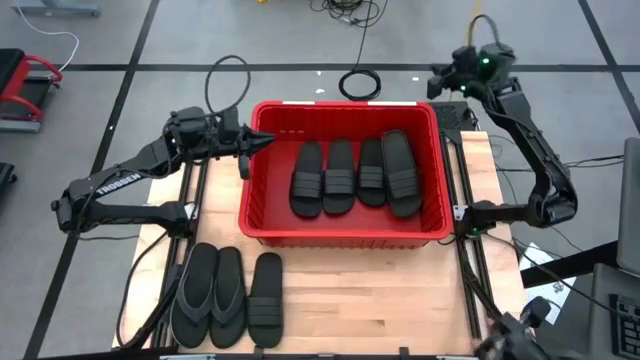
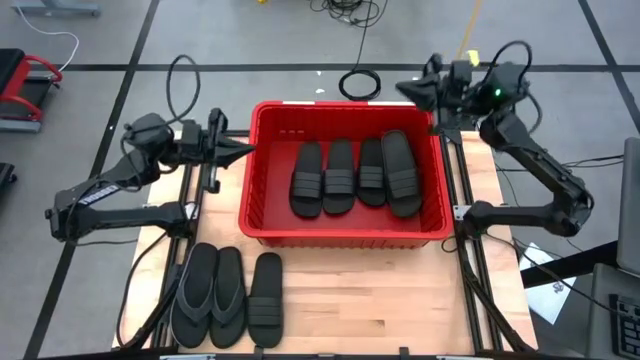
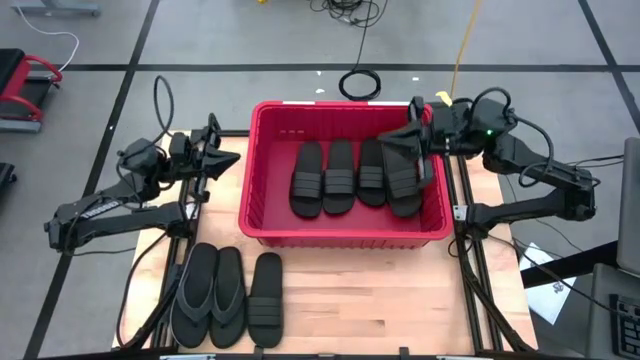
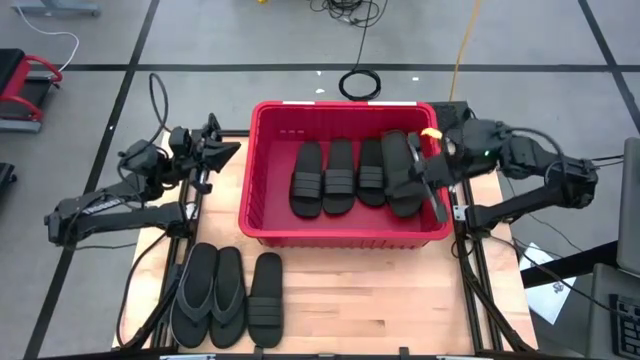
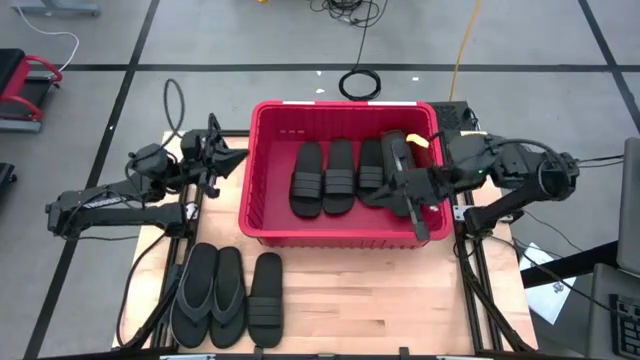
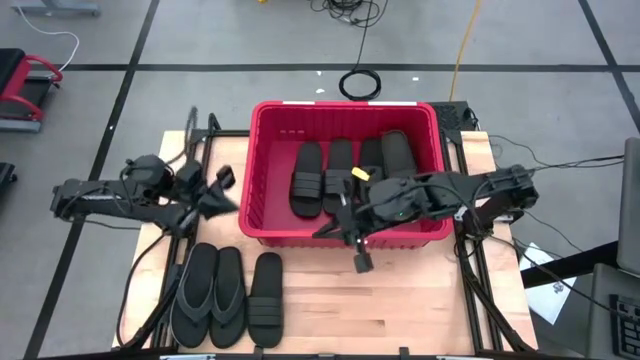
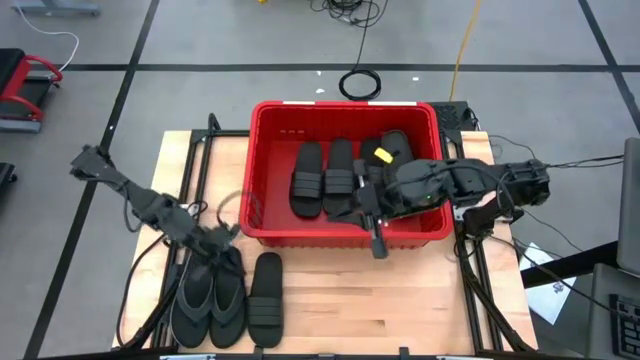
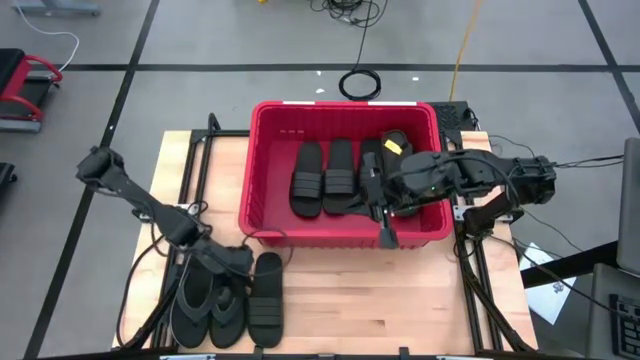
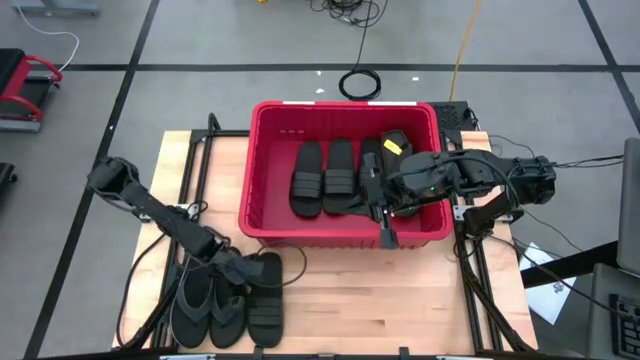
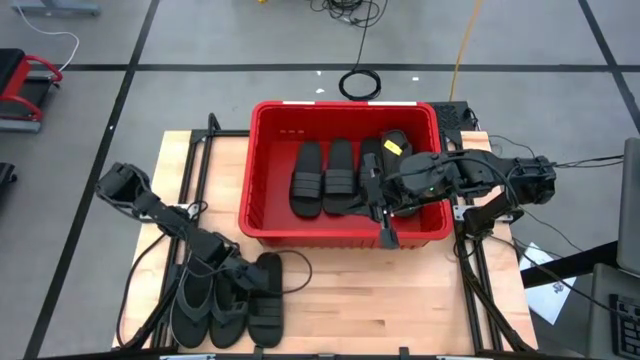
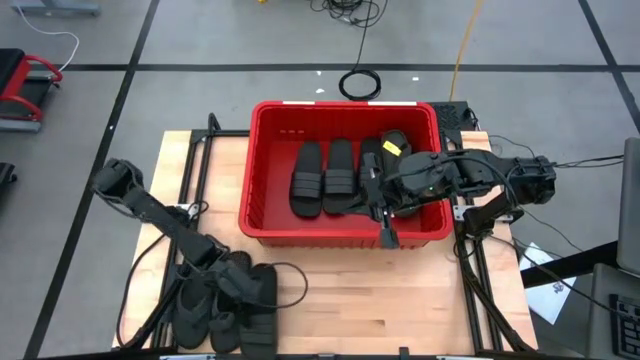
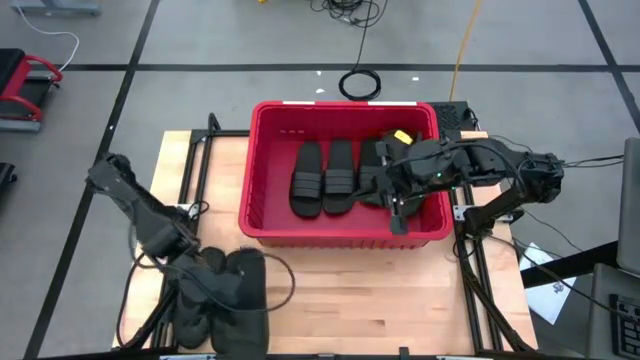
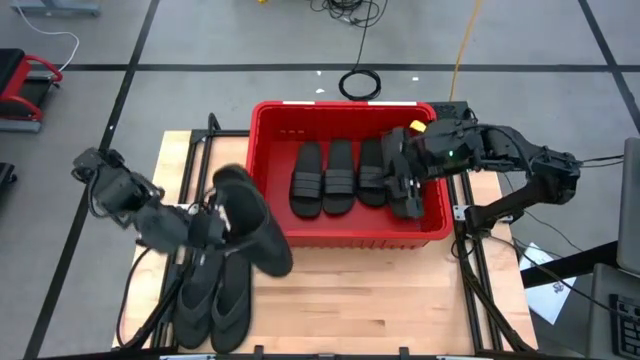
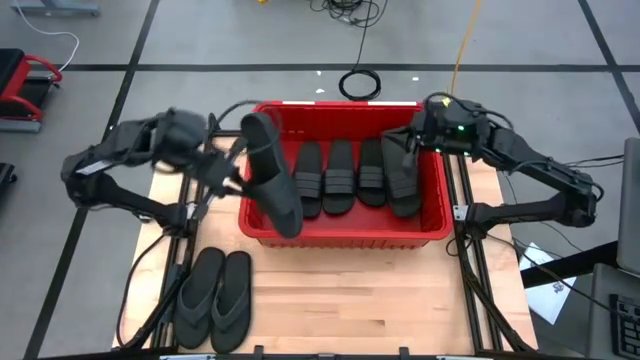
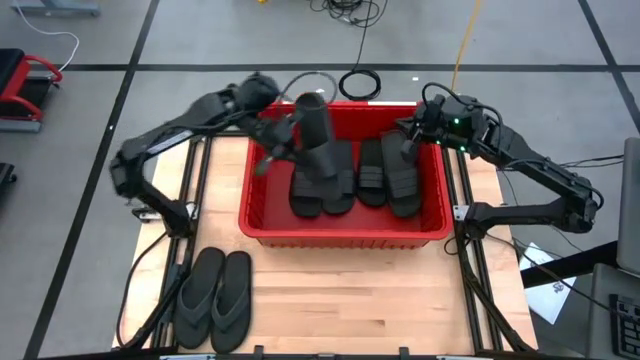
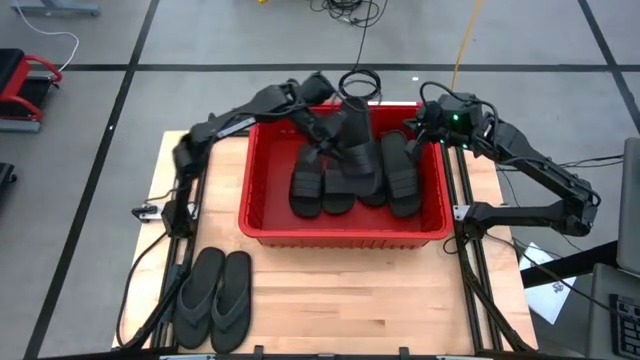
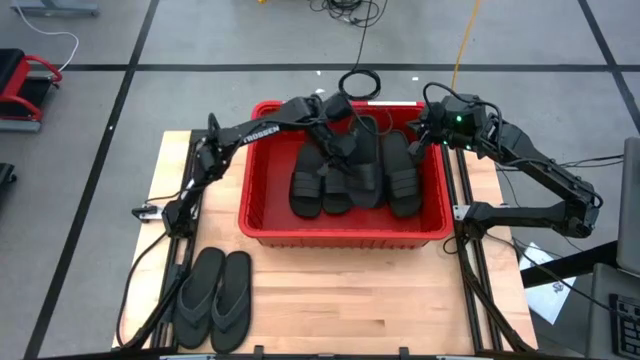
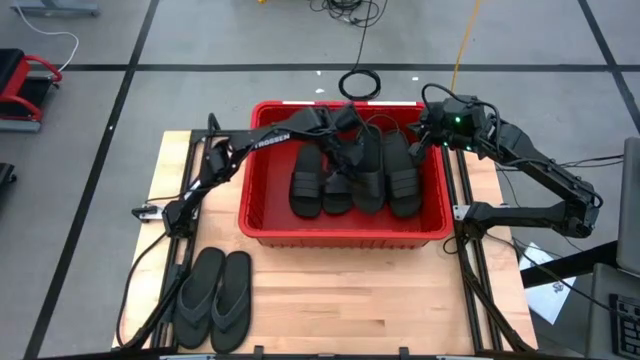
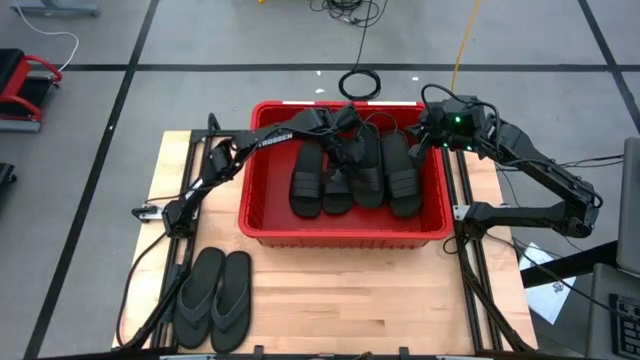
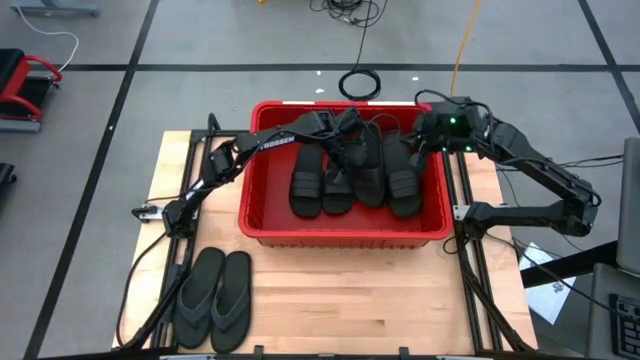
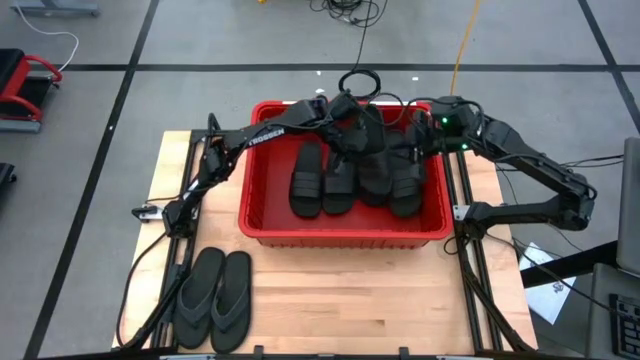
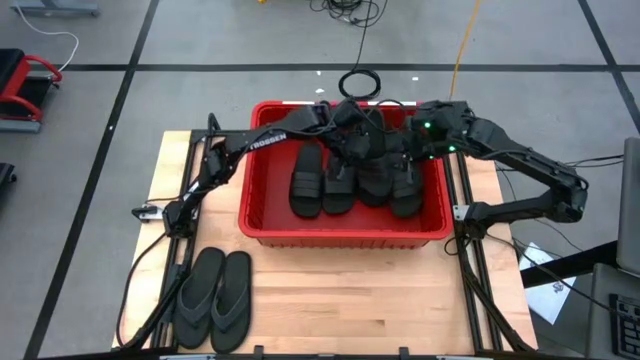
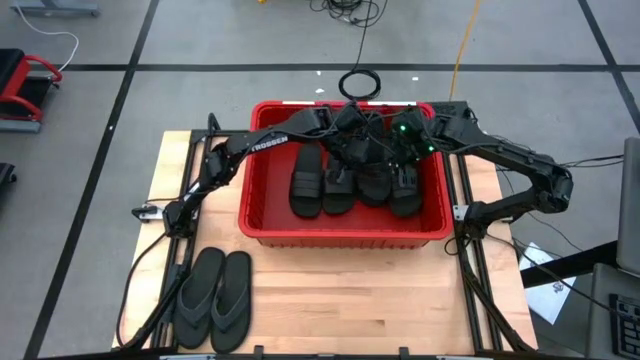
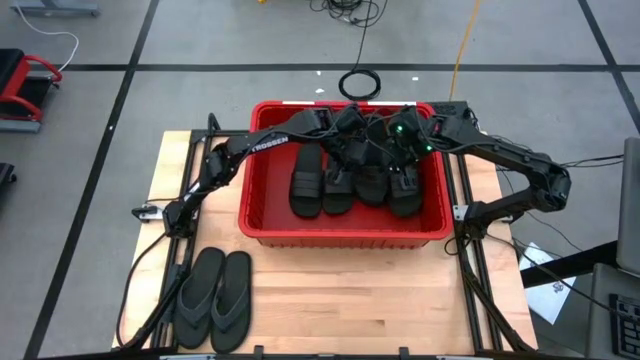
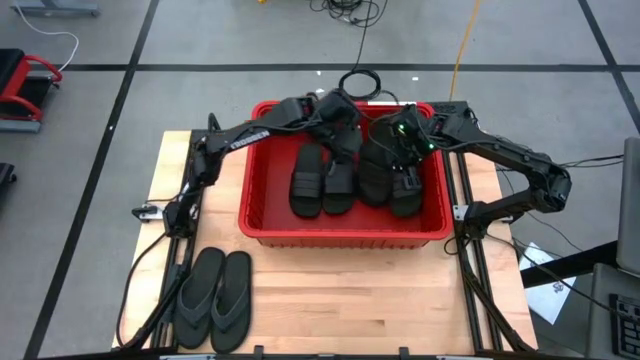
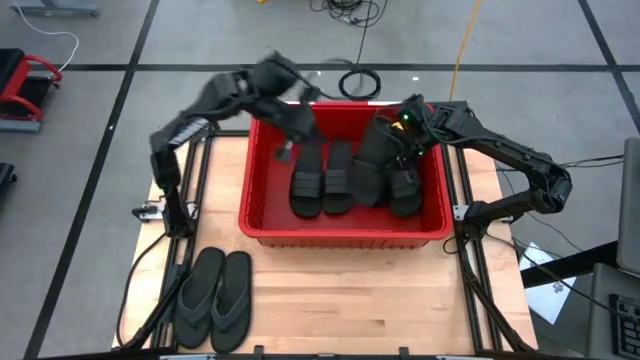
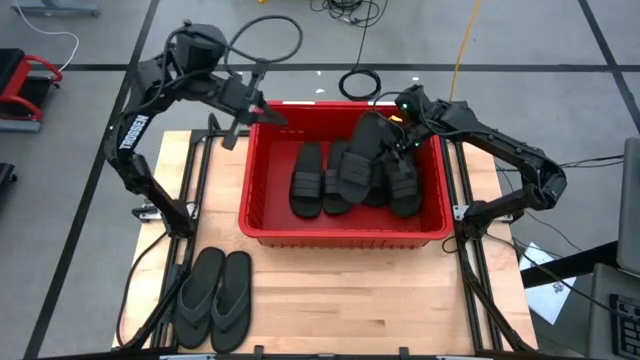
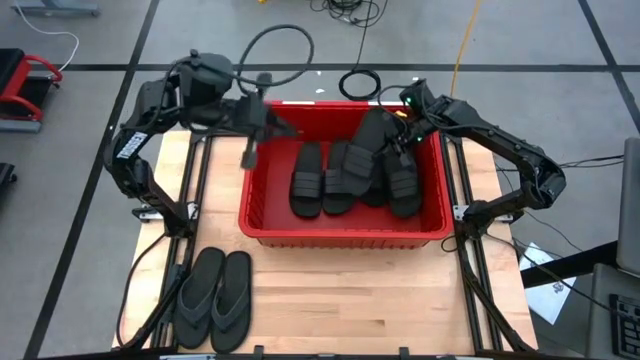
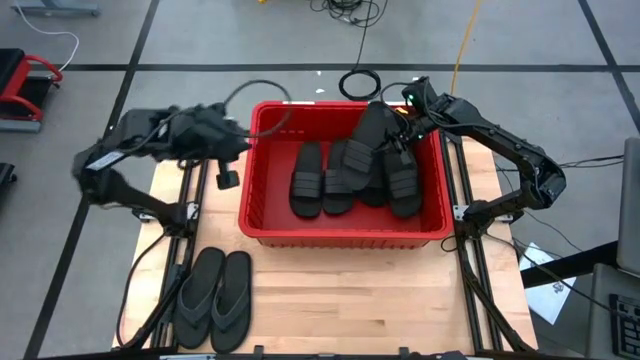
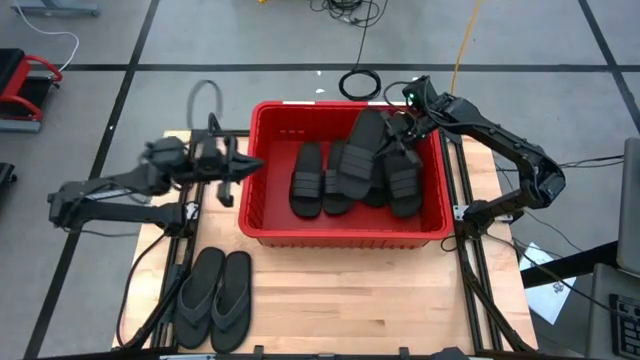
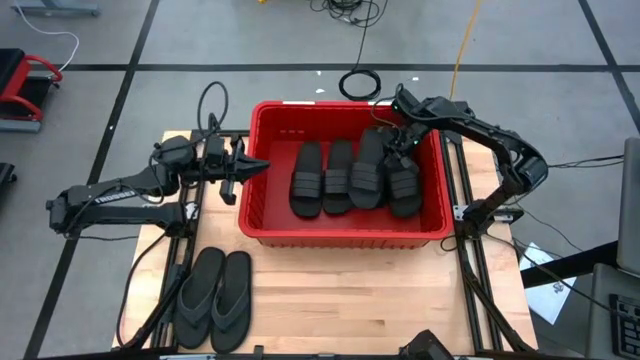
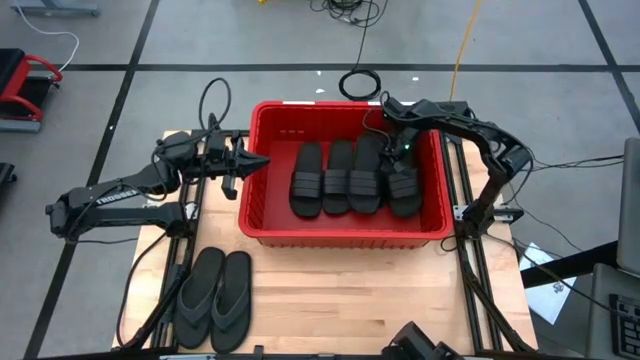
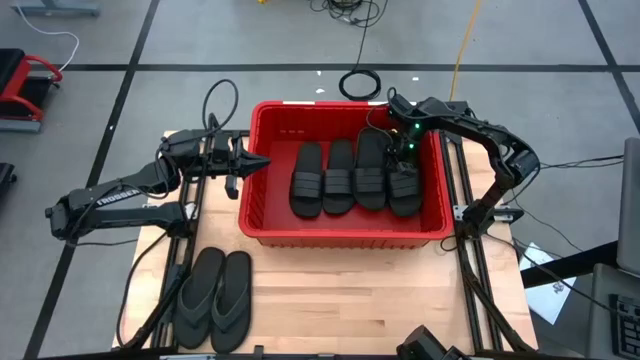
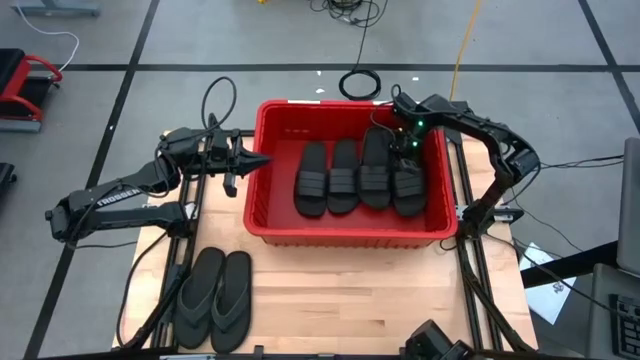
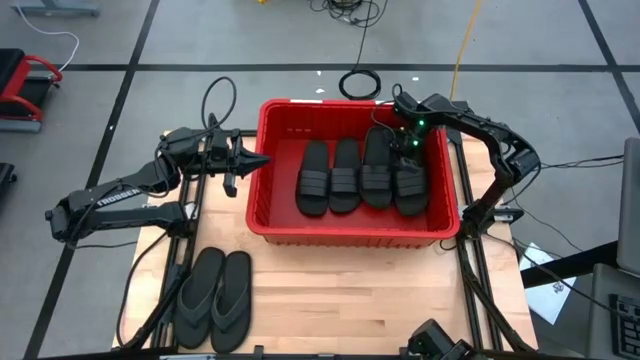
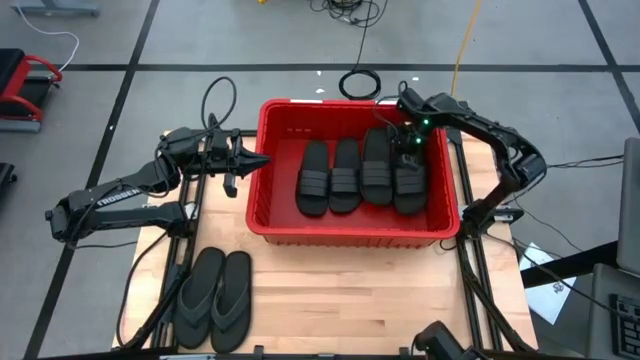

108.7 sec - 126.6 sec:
Task: Pick and place slides into bin
Put the black slide into the red bin

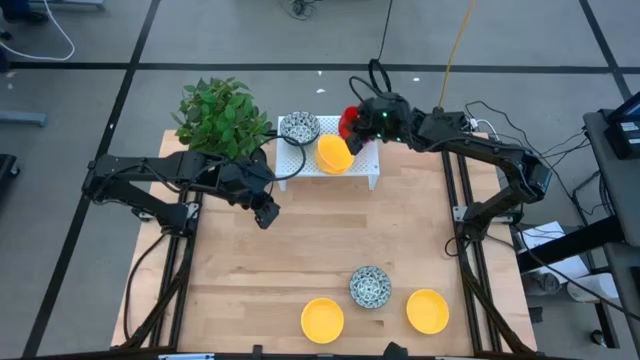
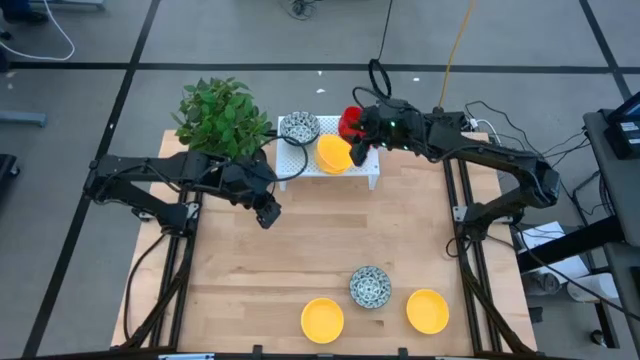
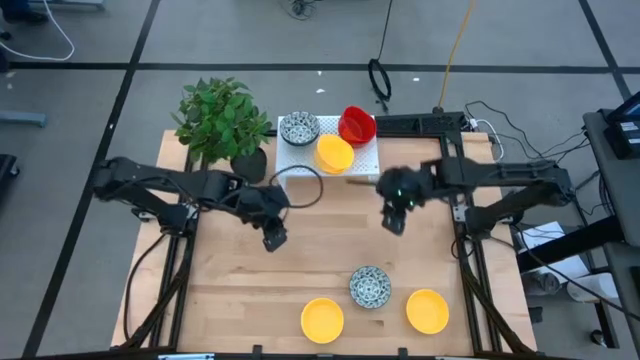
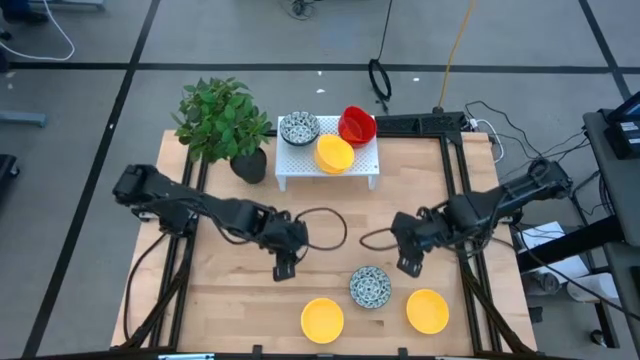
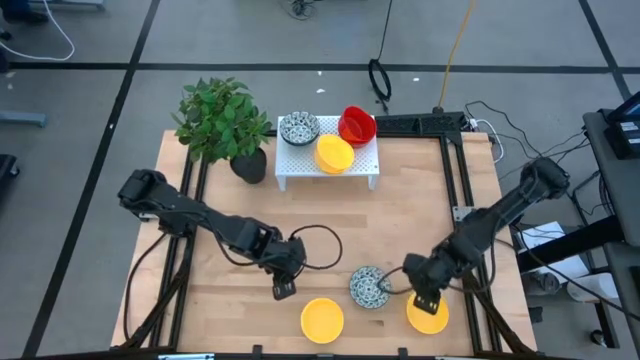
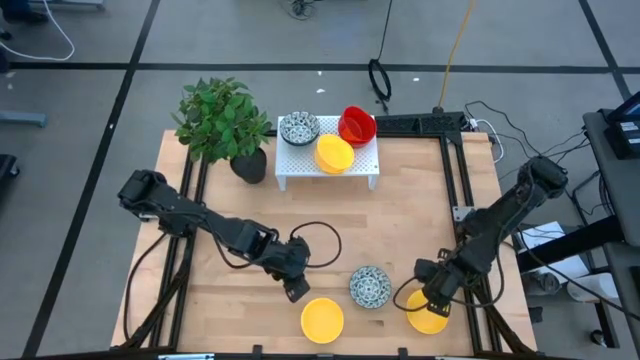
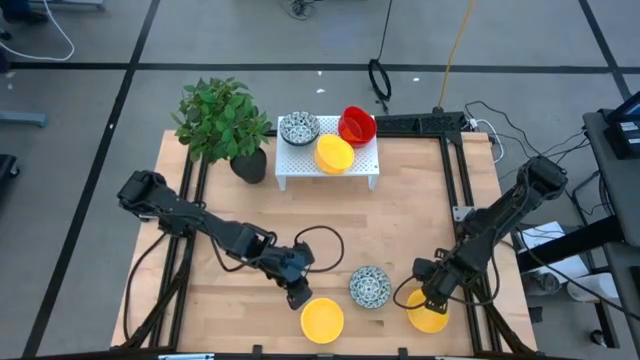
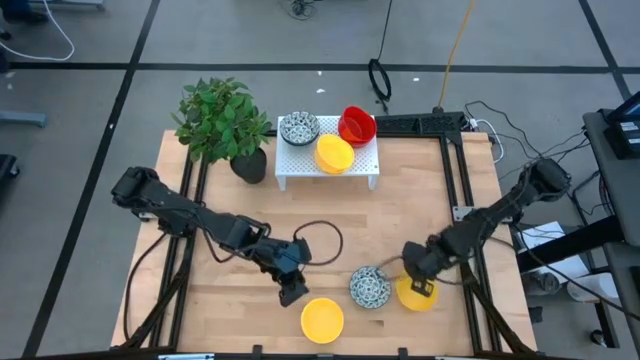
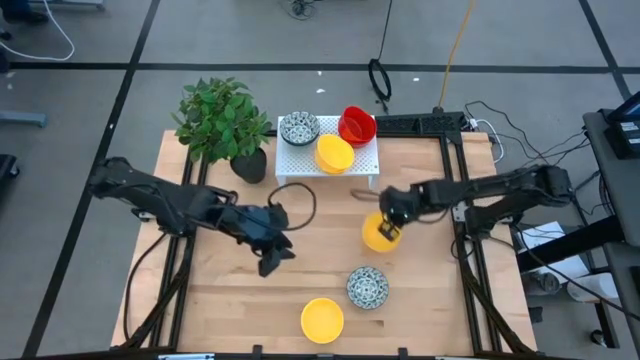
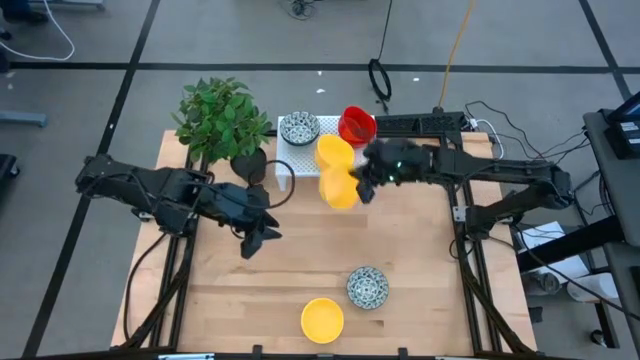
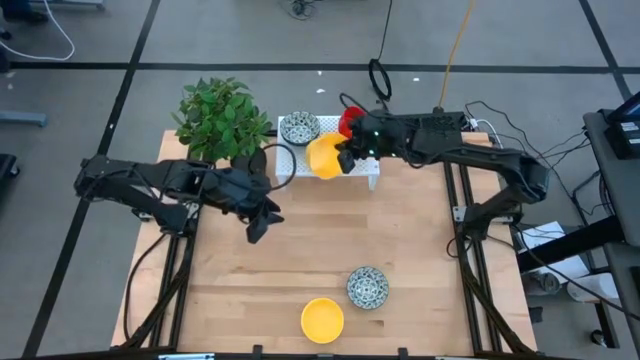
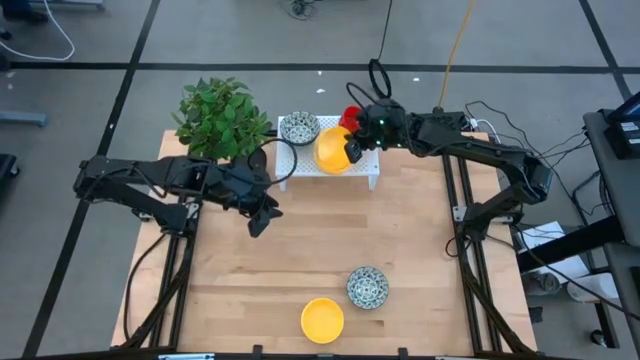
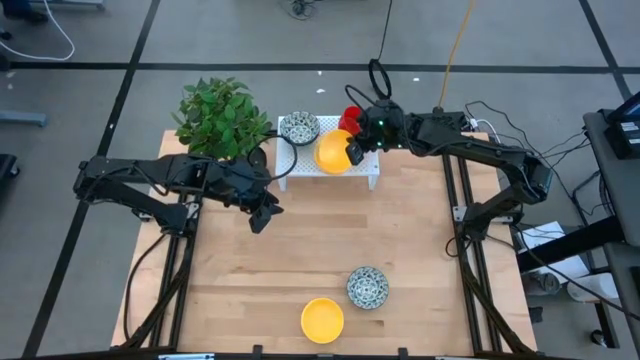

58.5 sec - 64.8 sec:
Task: Pick & Place Mini bowls
Stack the yellow bowl on top of the yellow bowl on the shelf
